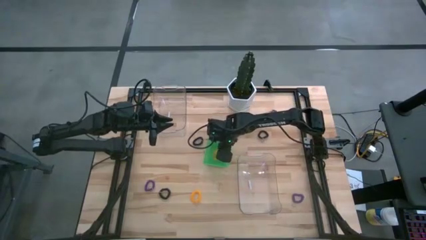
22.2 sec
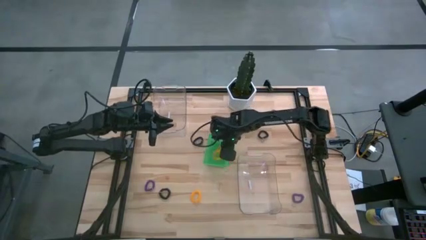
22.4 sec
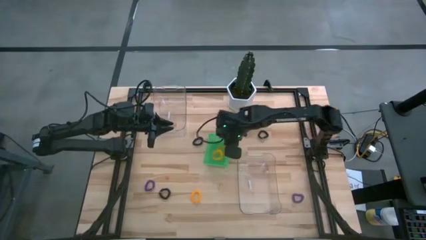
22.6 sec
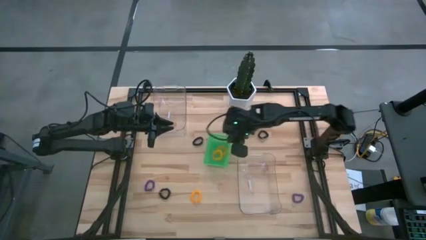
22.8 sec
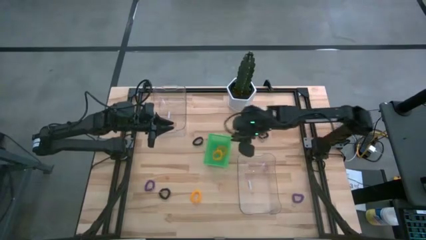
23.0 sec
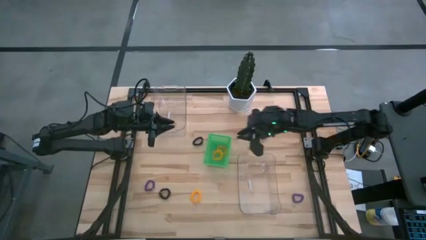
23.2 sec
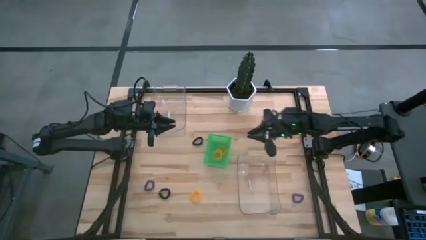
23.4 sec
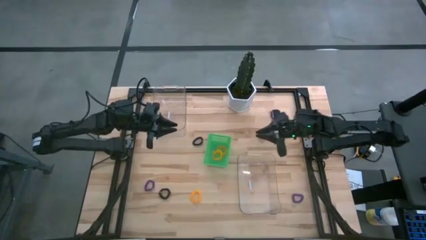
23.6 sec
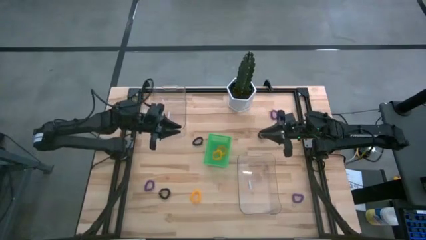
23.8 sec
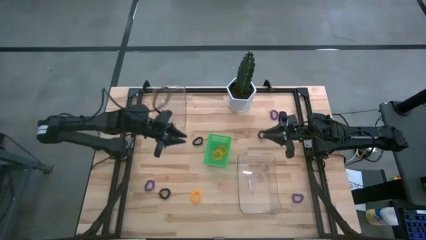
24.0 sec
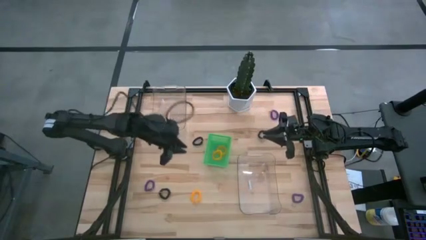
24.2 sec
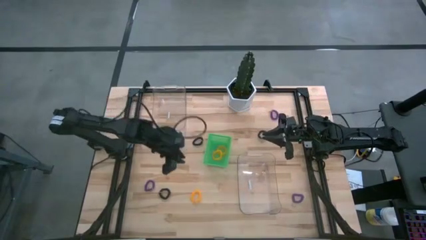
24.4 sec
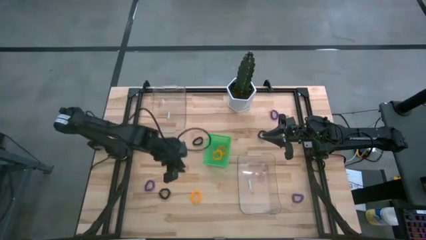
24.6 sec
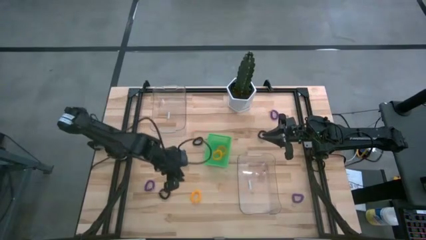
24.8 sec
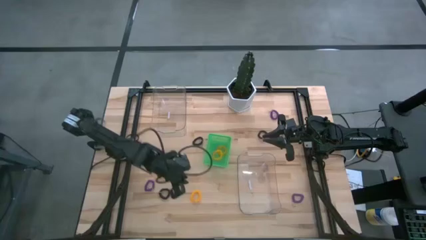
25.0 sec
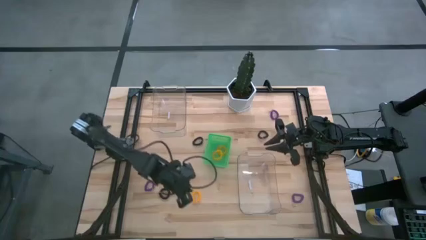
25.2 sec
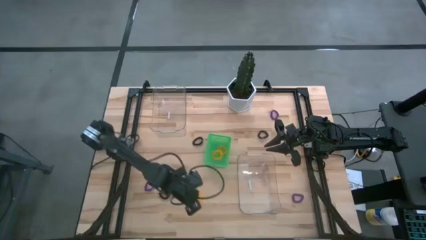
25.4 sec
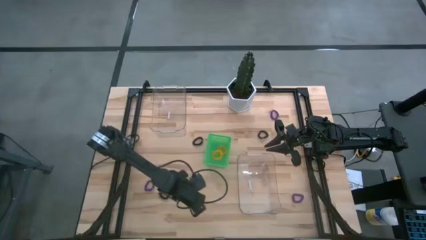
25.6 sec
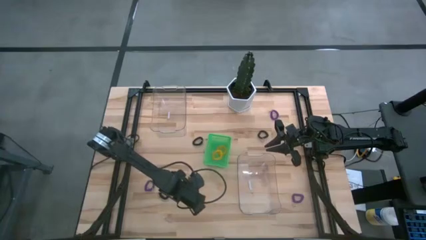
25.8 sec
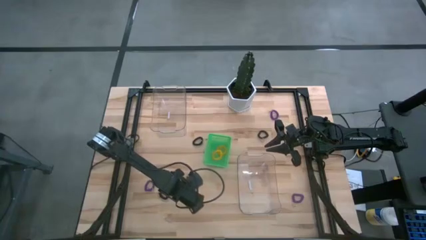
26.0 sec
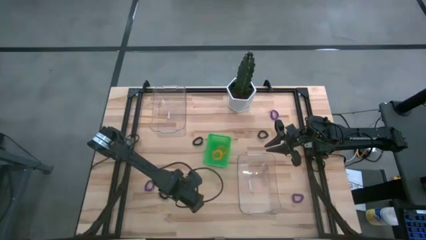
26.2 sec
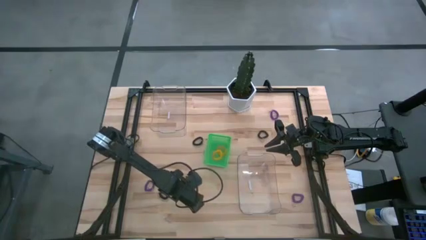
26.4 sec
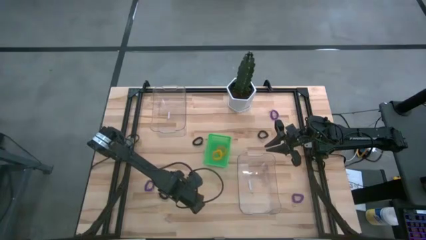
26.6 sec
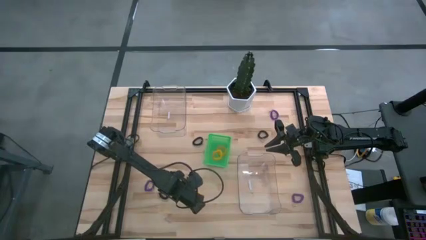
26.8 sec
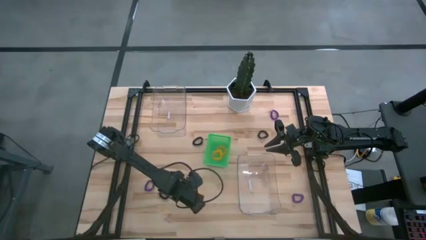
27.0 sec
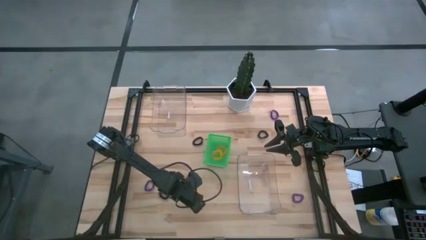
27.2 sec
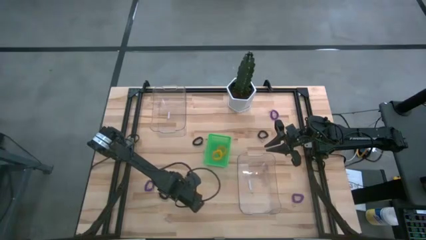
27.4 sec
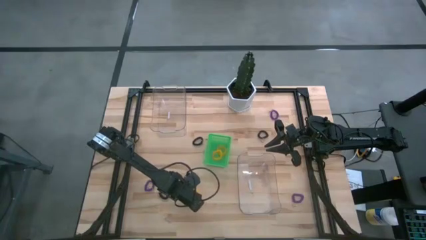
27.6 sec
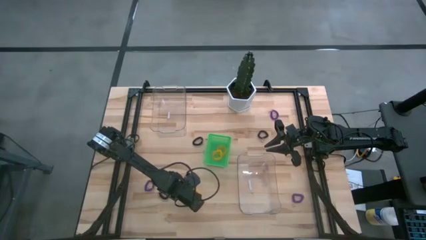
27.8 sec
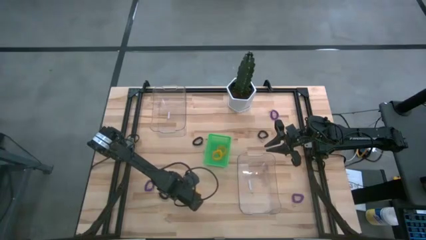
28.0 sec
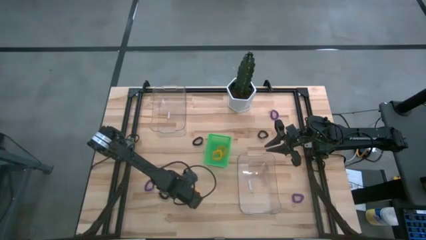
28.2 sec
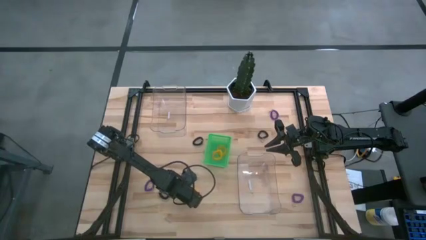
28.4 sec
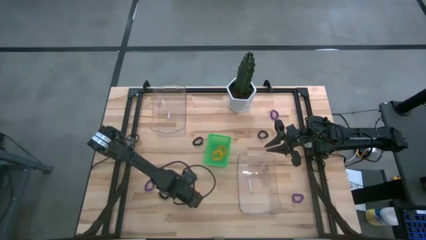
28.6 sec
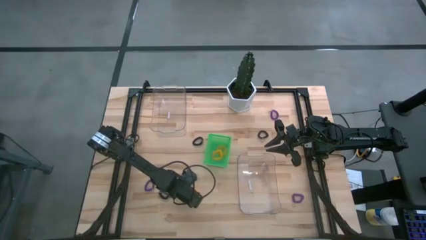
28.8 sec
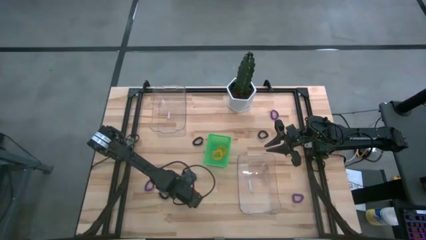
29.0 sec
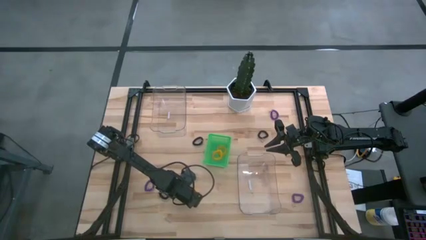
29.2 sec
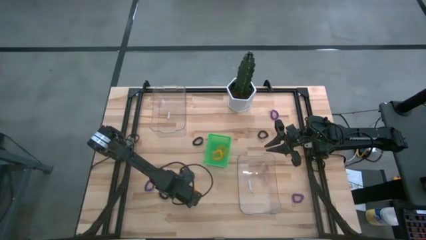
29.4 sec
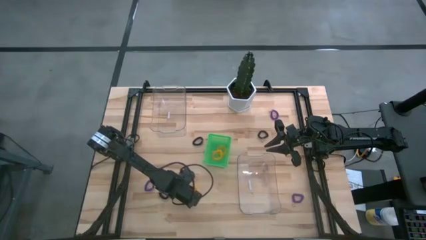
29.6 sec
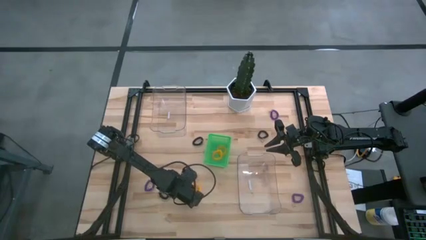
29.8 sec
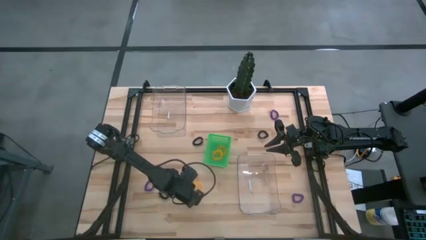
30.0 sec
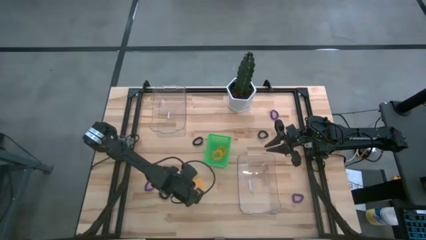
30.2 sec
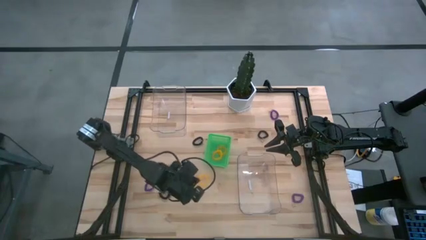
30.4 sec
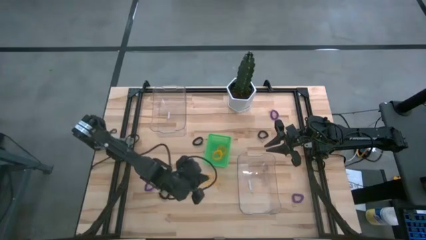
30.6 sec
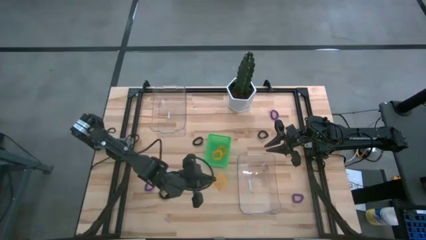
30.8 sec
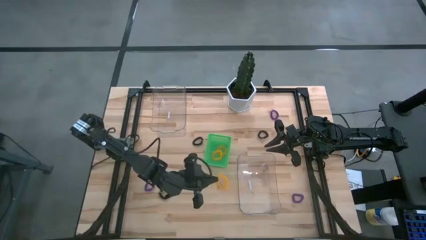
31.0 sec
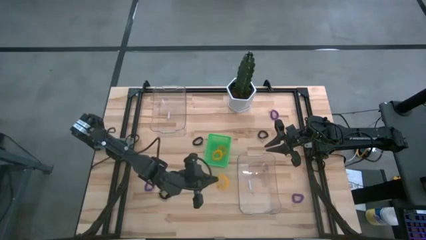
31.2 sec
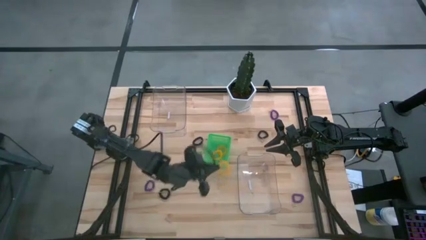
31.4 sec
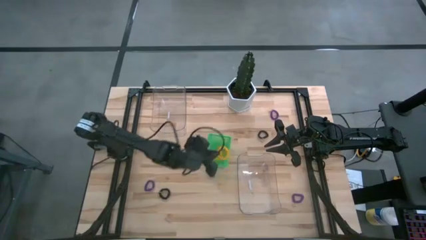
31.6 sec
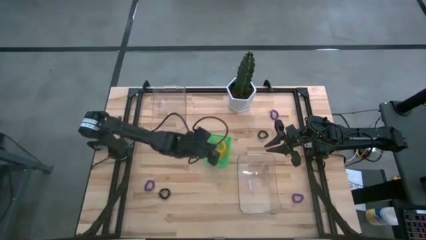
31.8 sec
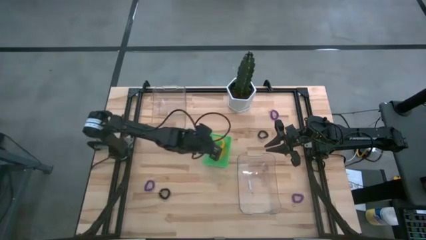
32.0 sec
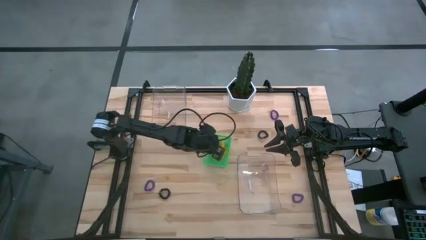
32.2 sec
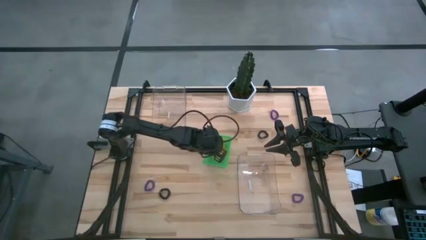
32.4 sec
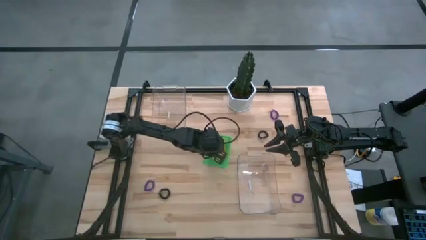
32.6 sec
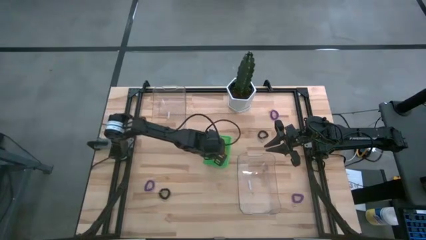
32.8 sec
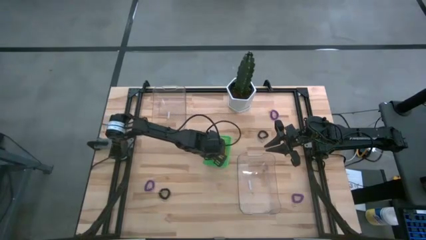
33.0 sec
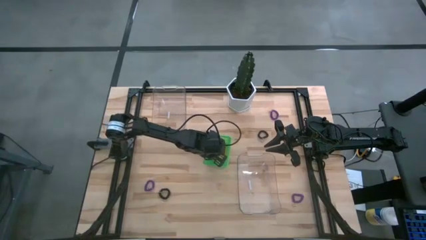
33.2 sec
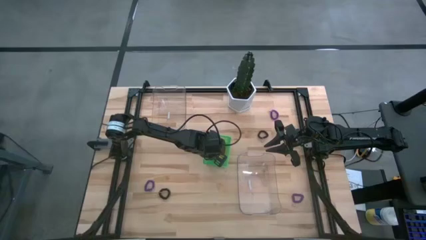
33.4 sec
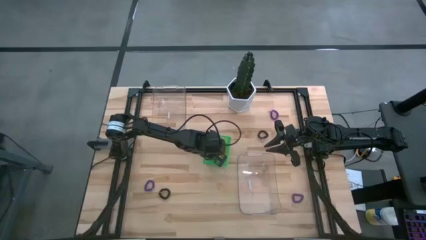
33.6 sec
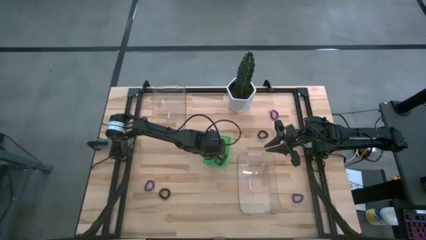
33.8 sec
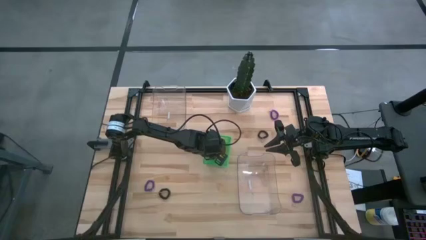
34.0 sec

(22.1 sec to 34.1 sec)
Task: Sort spring keychains
Put the yellow spring keychain into the green basket
